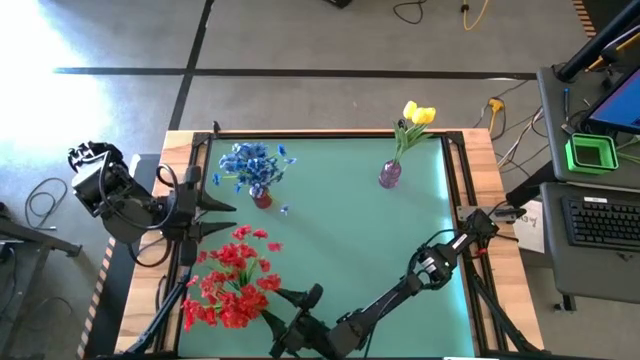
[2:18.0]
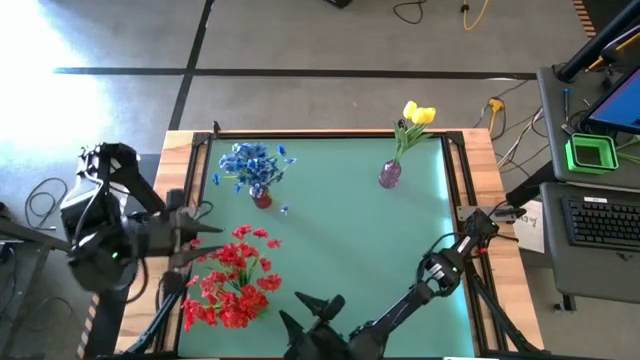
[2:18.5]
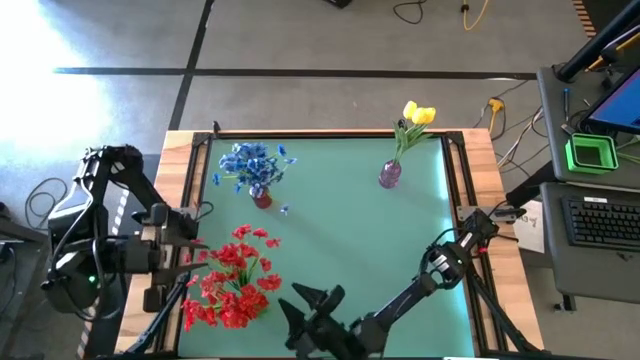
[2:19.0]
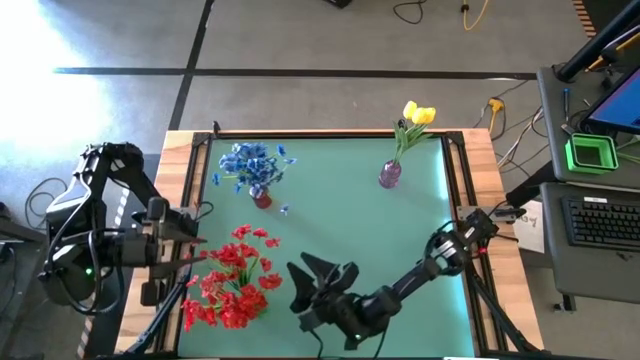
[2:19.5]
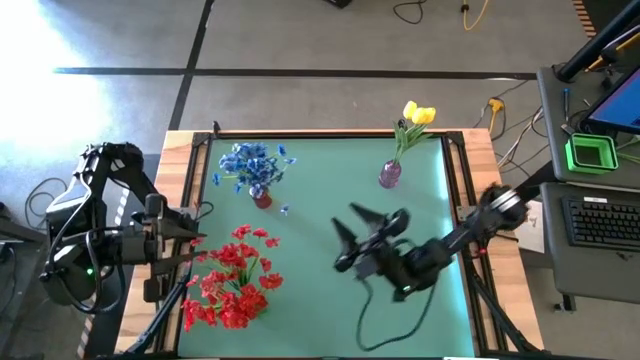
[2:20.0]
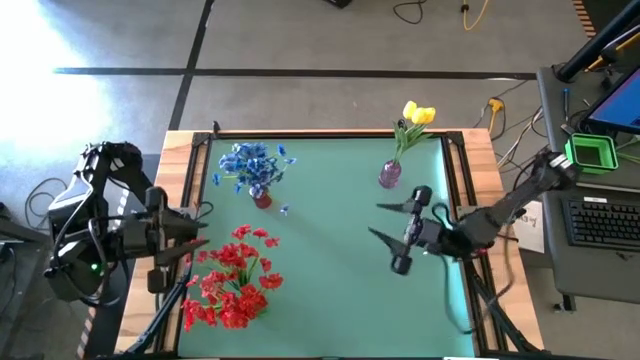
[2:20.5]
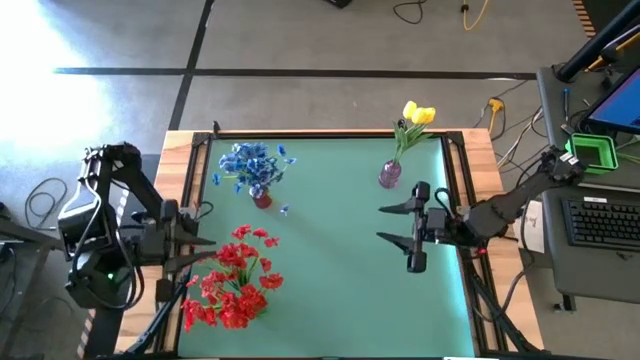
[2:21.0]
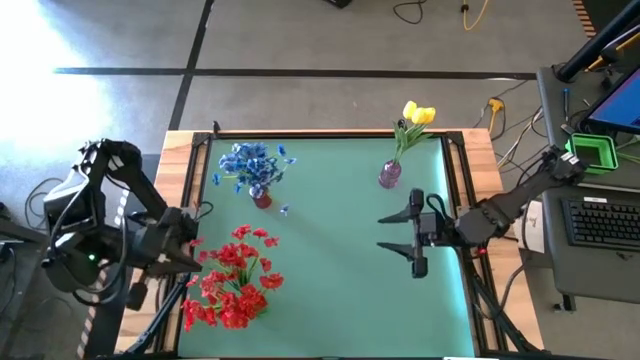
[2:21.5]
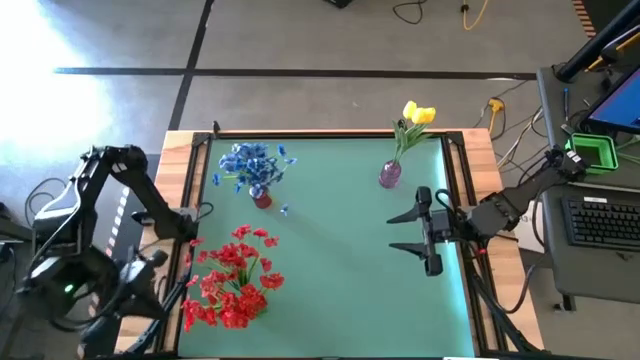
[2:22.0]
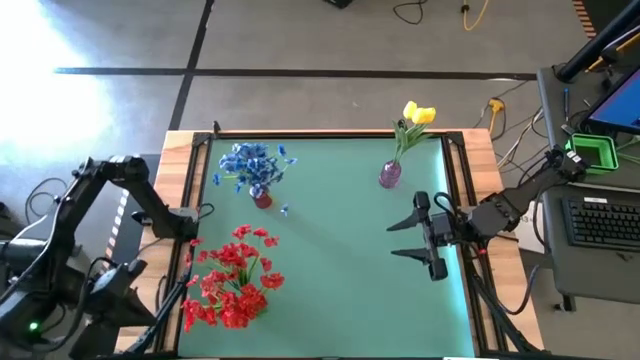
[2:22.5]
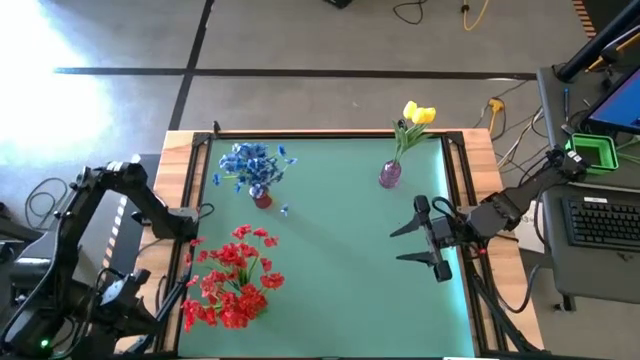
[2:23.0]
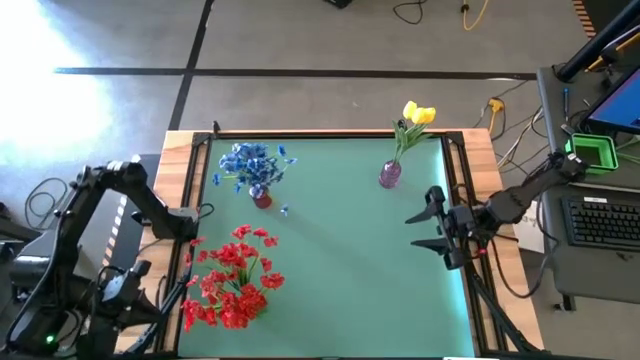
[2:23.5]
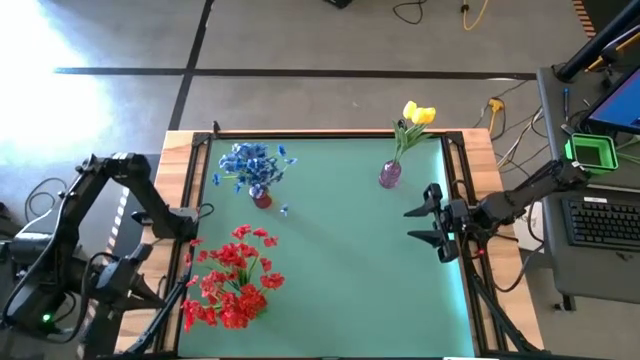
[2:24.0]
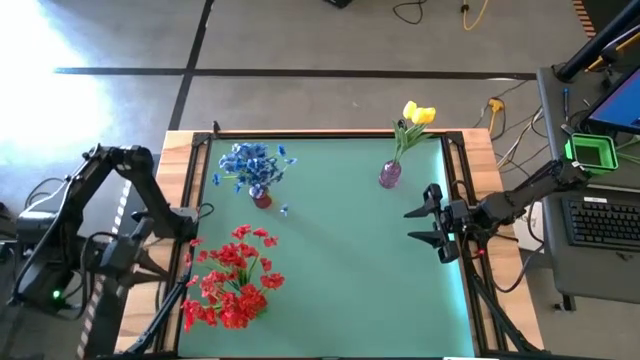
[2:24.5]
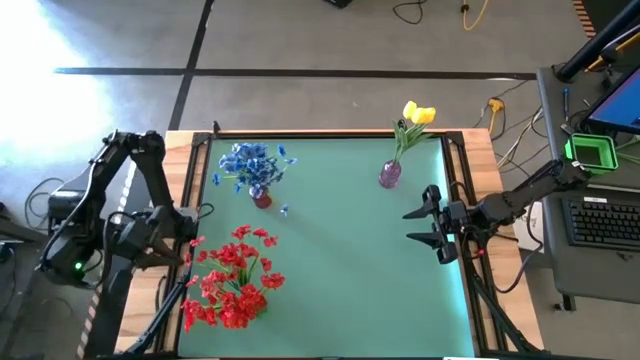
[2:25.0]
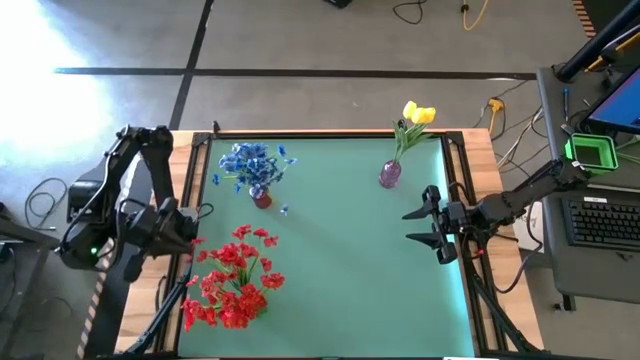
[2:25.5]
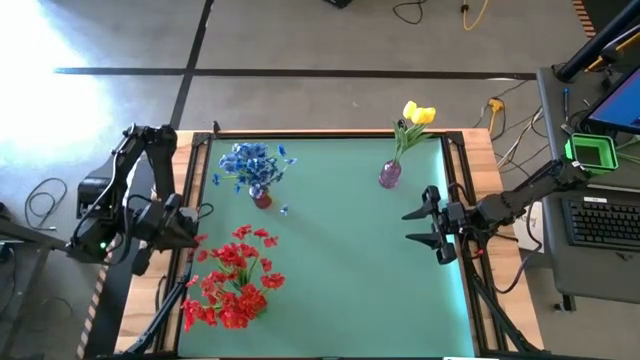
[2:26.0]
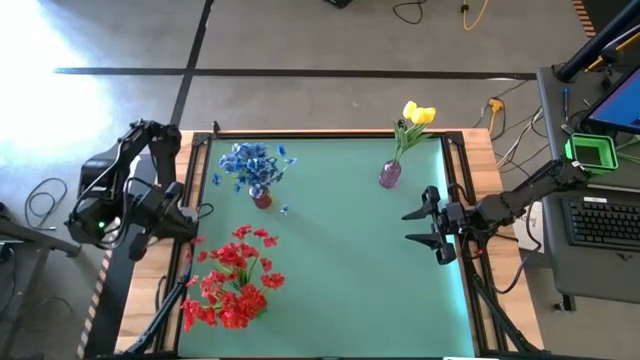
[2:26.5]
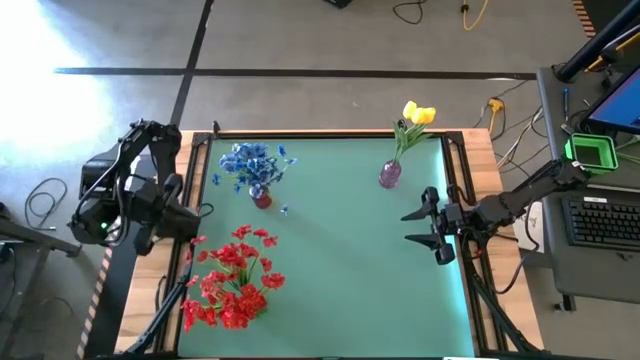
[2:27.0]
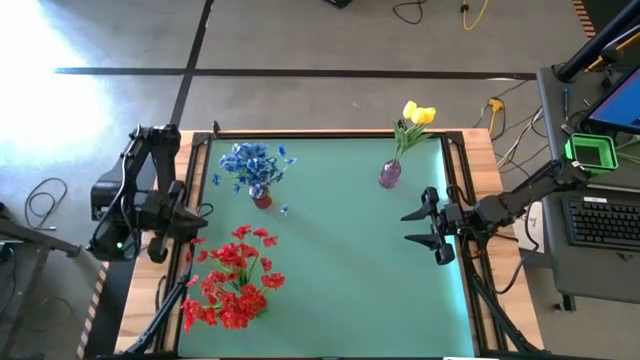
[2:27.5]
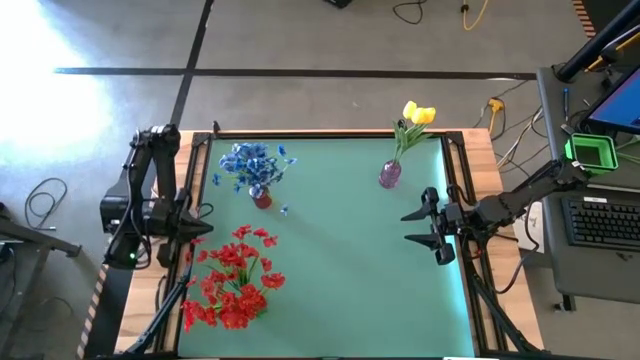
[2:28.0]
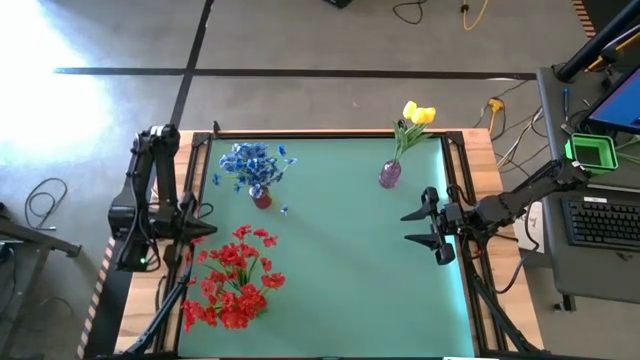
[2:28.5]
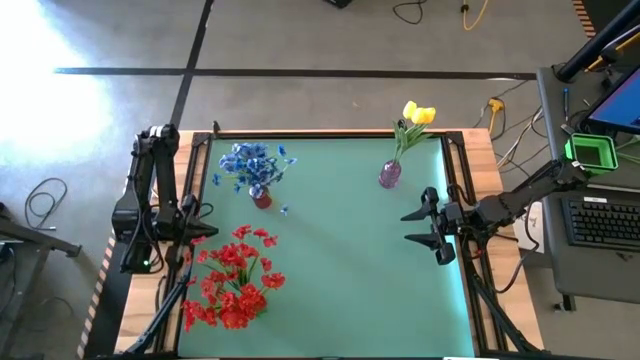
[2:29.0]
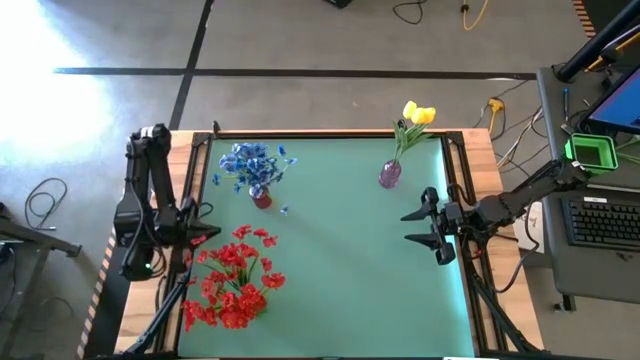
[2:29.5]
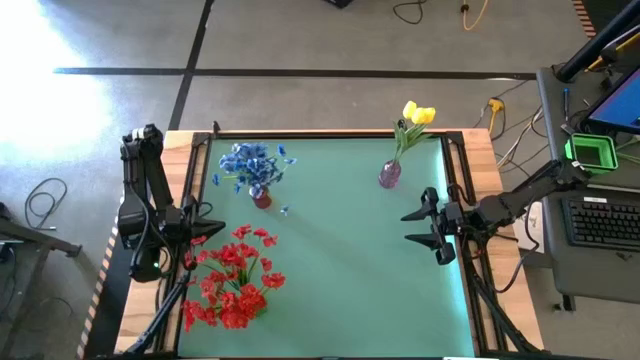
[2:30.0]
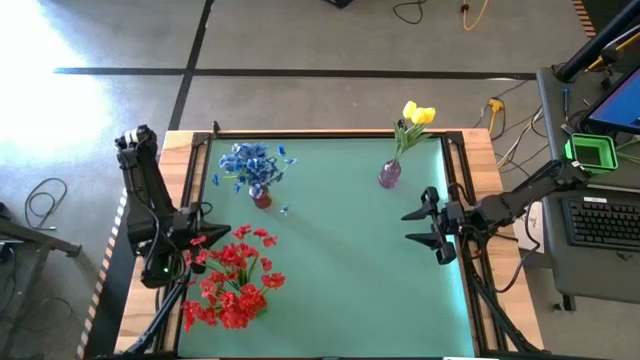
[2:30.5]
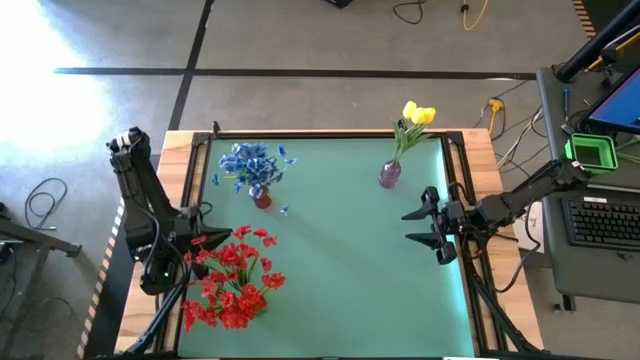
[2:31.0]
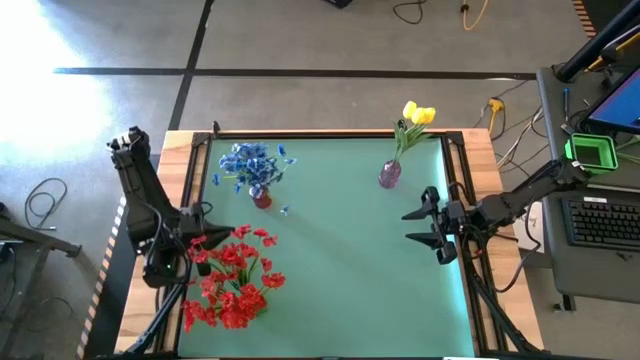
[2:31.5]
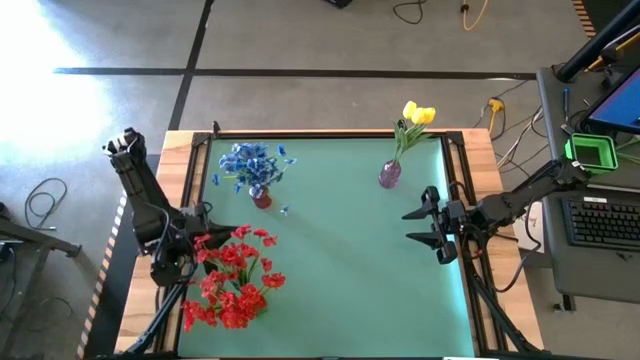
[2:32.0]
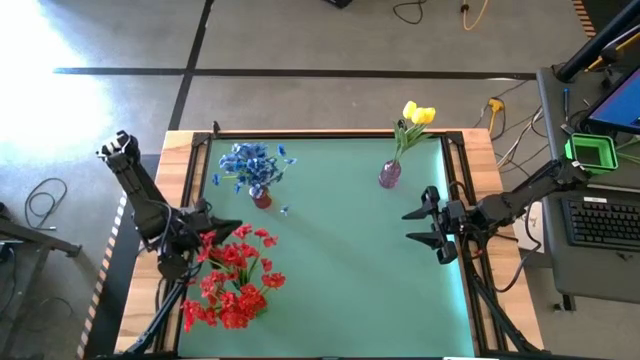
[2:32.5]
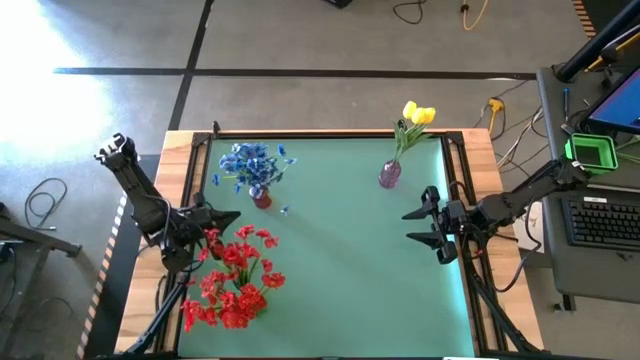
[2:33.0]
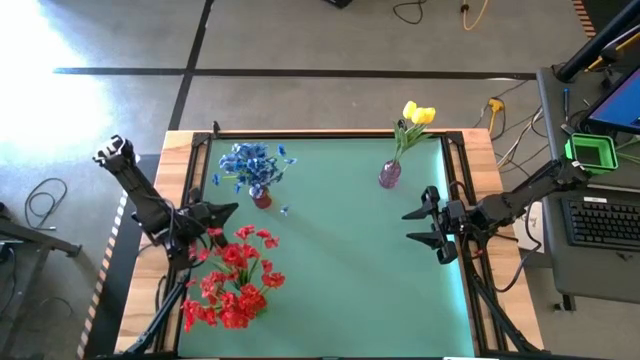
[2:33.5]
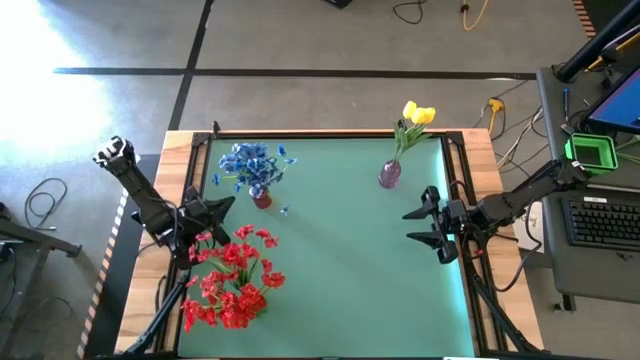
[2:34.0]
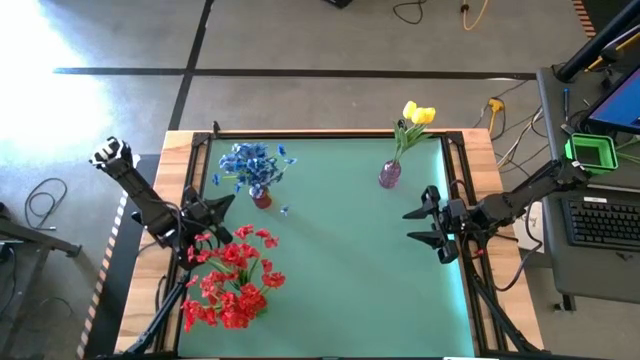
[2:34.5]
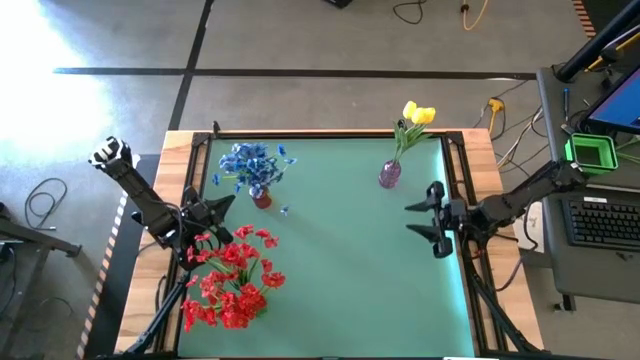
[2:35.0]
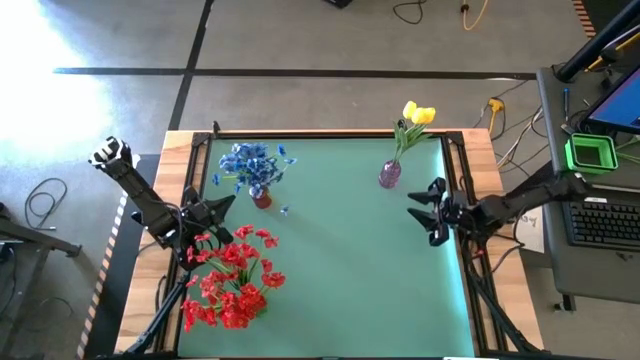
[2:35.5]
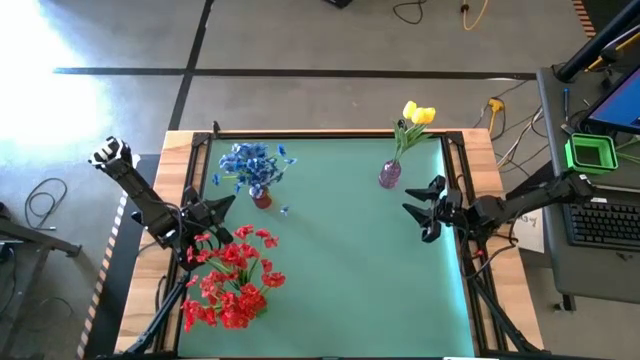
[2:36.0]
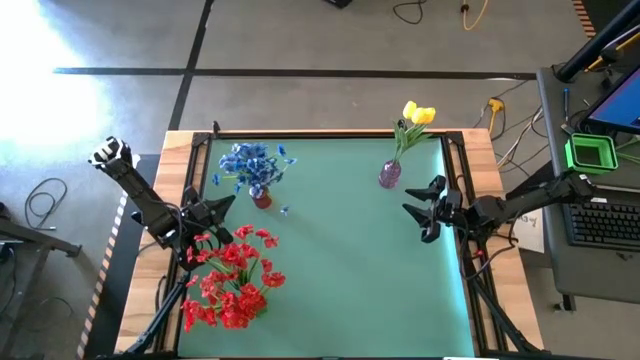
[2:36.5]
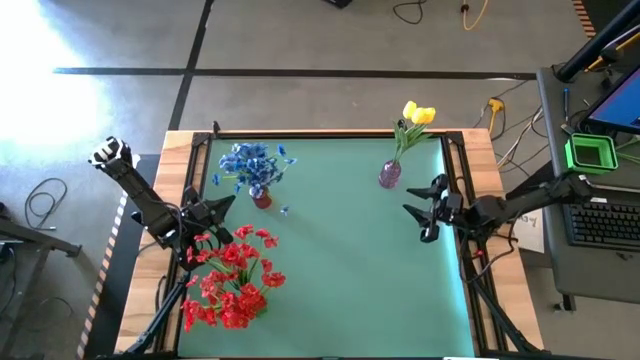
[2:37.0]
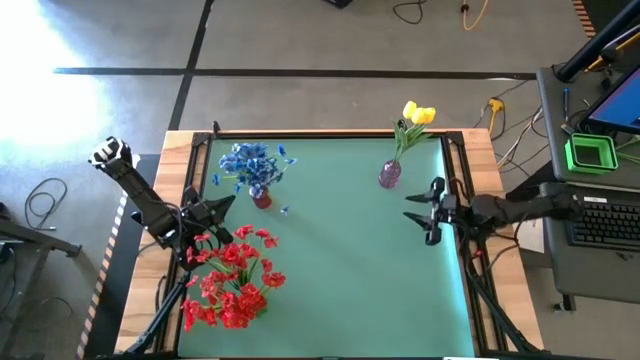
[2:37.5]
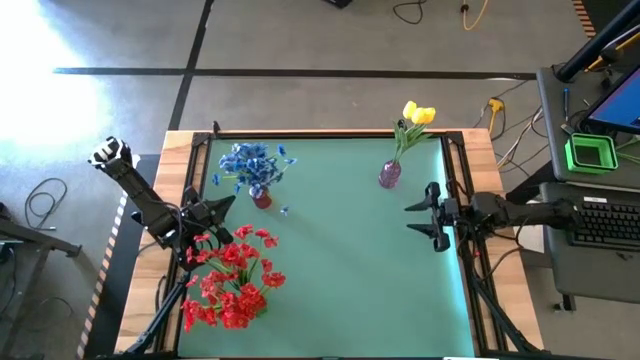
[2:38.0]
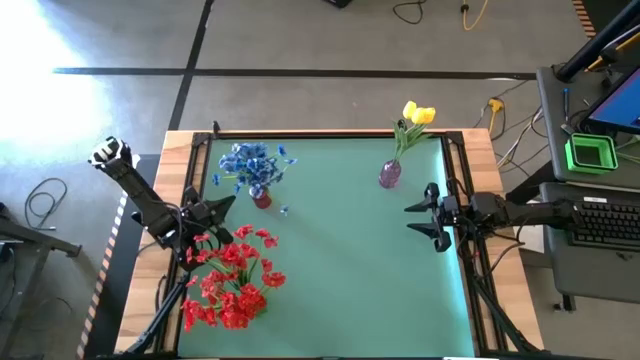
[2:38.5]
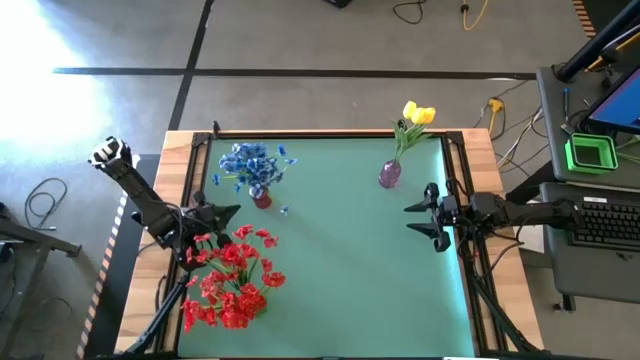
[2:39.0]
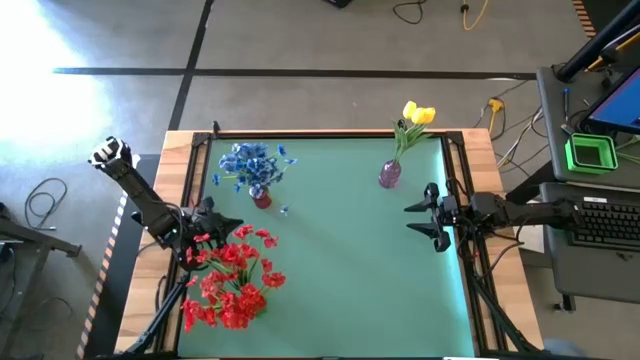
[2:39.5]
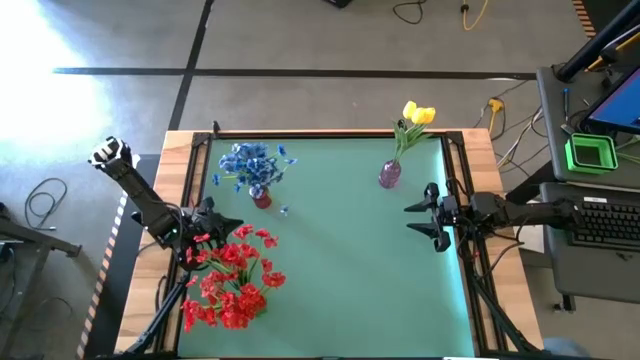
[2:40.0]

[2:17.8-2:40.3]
Task: Sort flowers into vase by color
Return to Home Position
